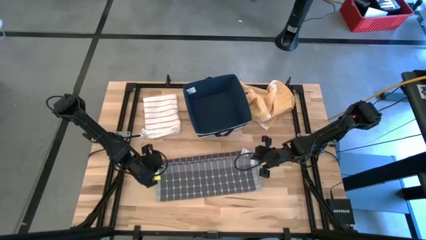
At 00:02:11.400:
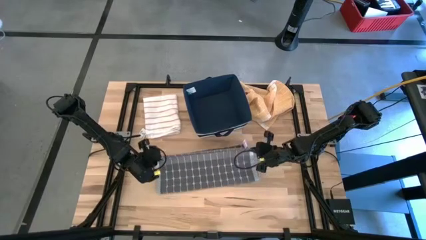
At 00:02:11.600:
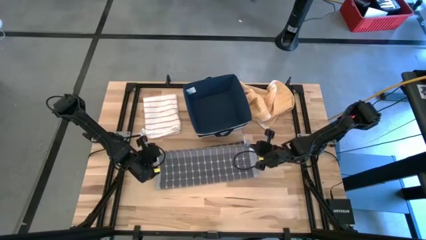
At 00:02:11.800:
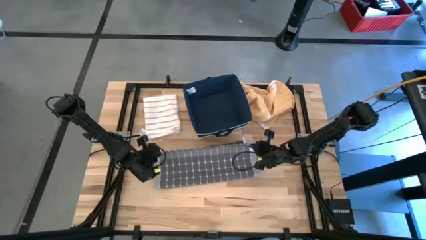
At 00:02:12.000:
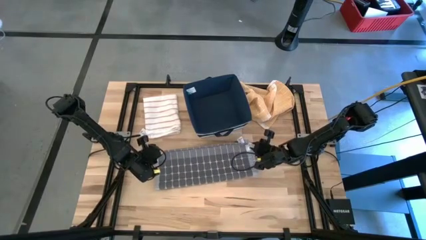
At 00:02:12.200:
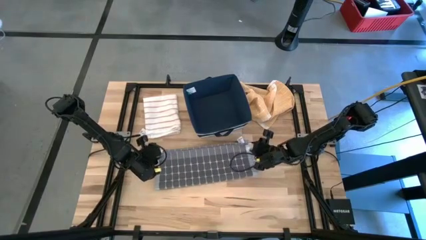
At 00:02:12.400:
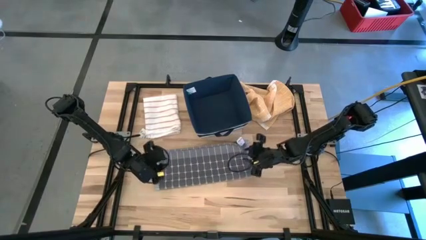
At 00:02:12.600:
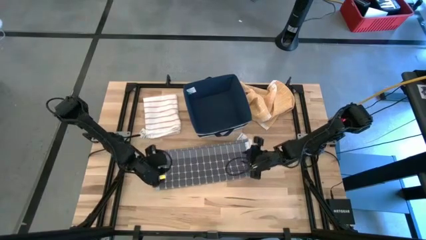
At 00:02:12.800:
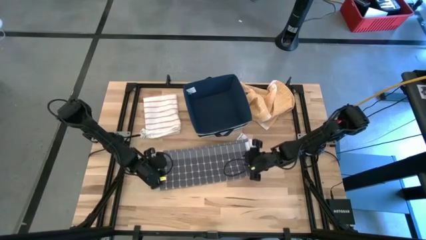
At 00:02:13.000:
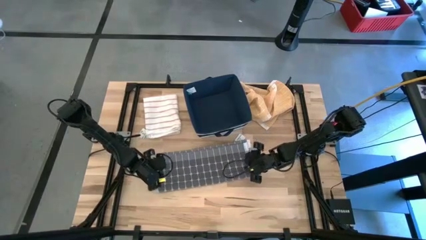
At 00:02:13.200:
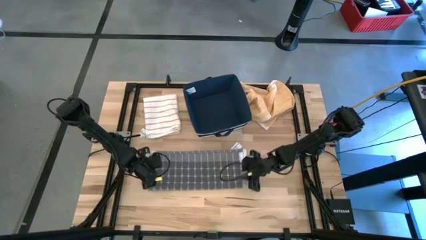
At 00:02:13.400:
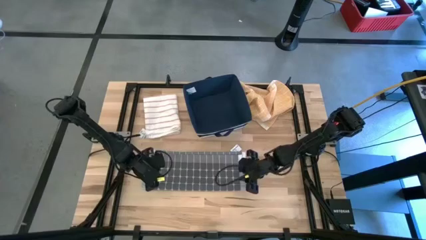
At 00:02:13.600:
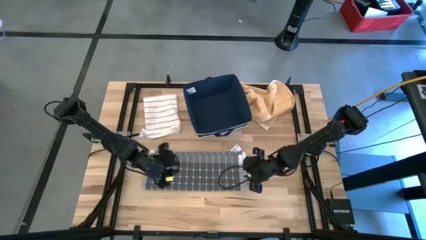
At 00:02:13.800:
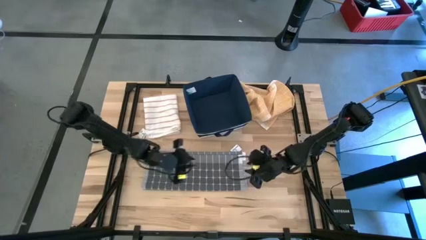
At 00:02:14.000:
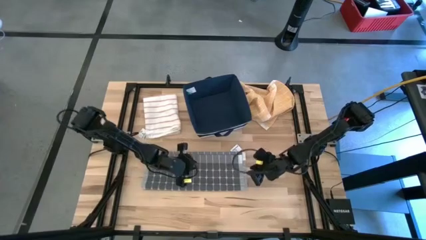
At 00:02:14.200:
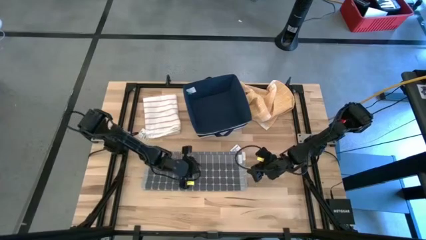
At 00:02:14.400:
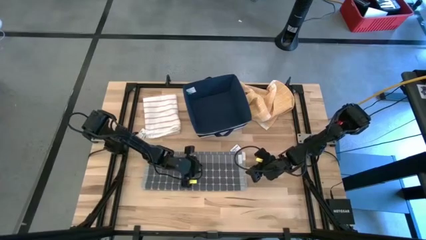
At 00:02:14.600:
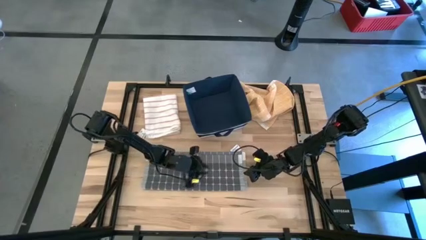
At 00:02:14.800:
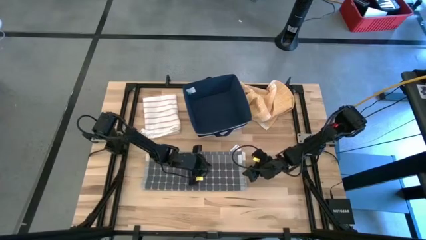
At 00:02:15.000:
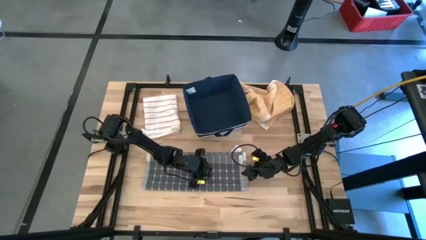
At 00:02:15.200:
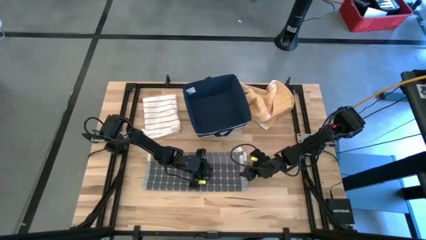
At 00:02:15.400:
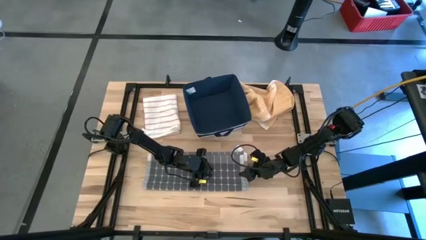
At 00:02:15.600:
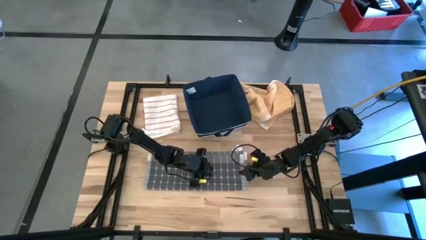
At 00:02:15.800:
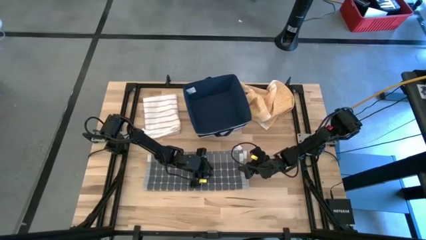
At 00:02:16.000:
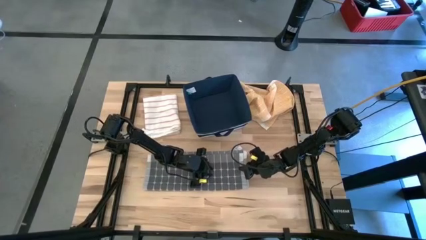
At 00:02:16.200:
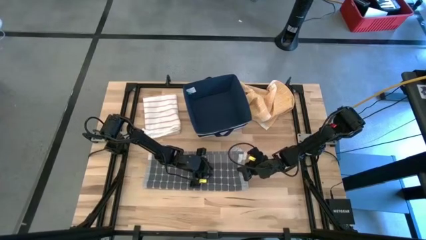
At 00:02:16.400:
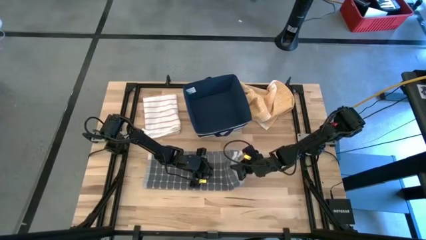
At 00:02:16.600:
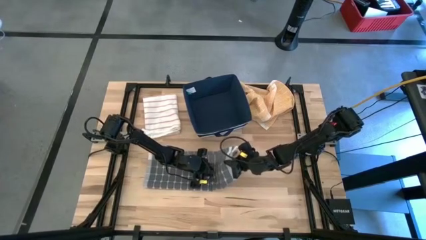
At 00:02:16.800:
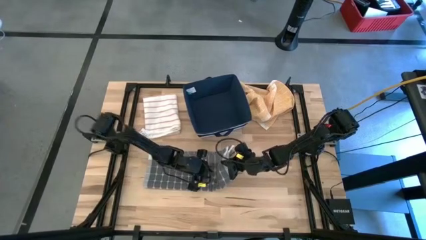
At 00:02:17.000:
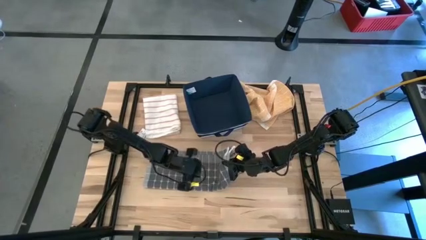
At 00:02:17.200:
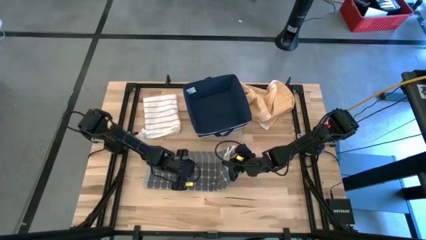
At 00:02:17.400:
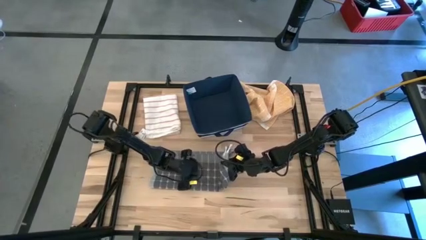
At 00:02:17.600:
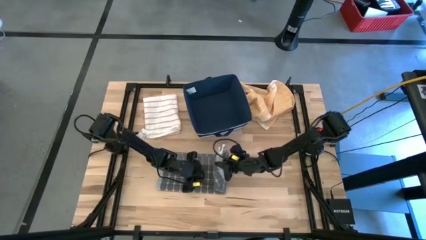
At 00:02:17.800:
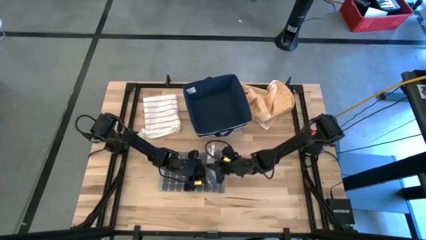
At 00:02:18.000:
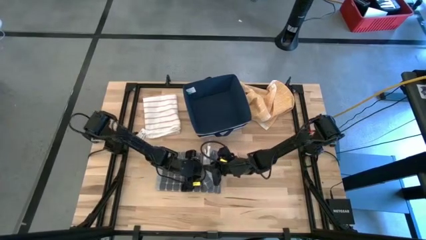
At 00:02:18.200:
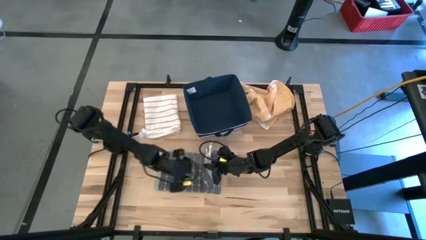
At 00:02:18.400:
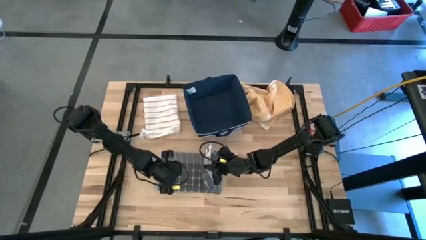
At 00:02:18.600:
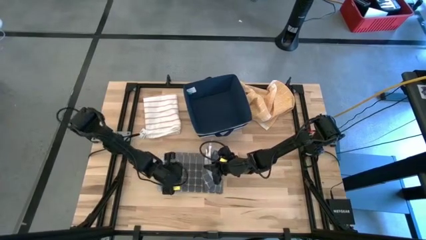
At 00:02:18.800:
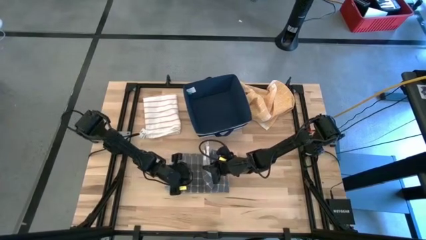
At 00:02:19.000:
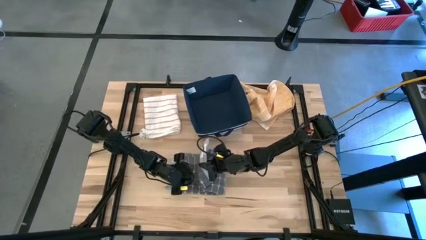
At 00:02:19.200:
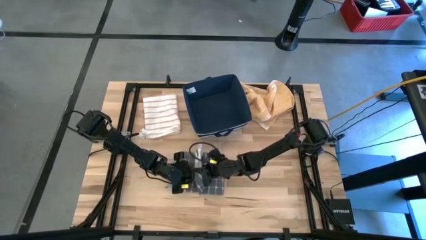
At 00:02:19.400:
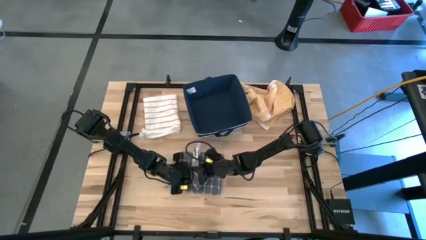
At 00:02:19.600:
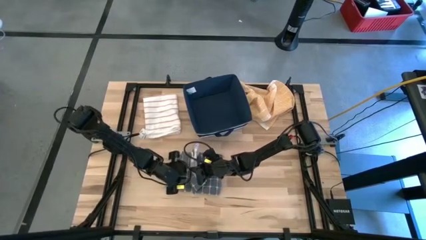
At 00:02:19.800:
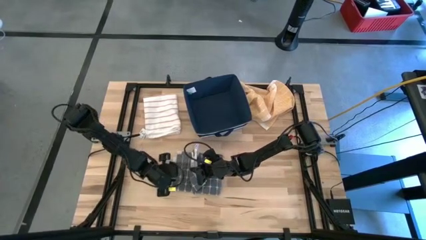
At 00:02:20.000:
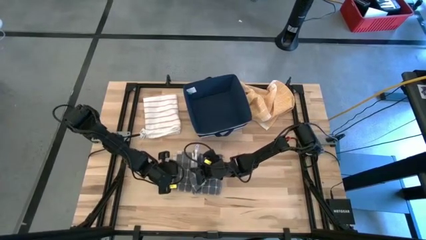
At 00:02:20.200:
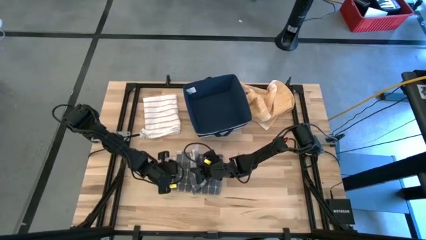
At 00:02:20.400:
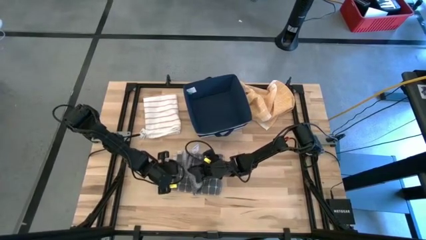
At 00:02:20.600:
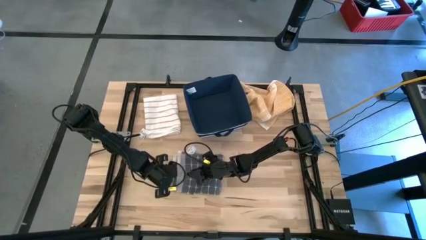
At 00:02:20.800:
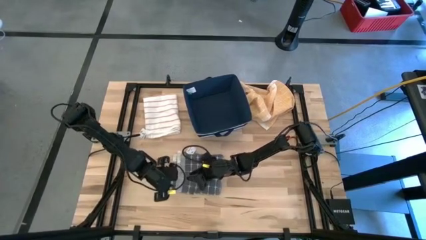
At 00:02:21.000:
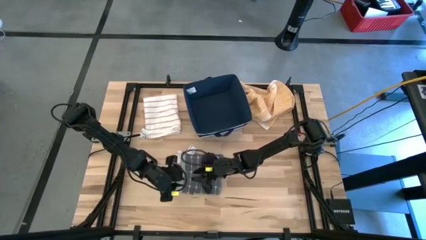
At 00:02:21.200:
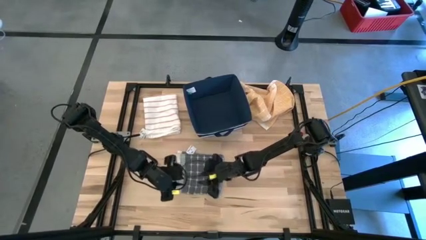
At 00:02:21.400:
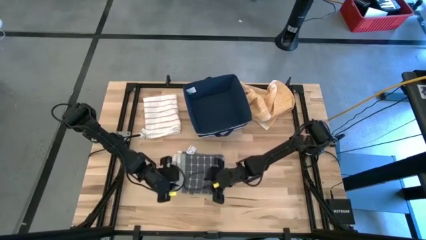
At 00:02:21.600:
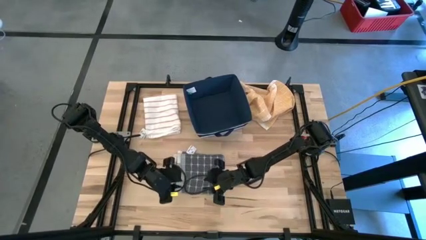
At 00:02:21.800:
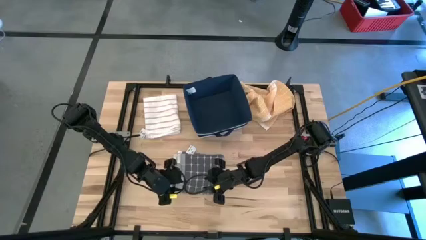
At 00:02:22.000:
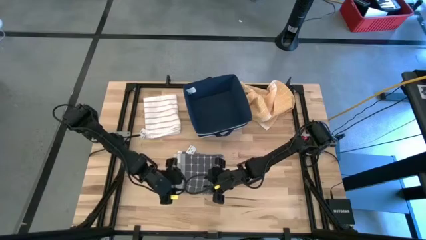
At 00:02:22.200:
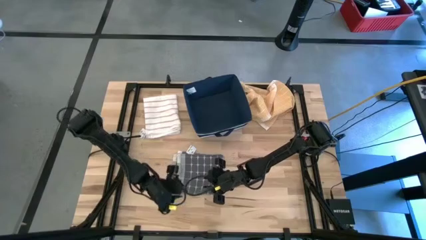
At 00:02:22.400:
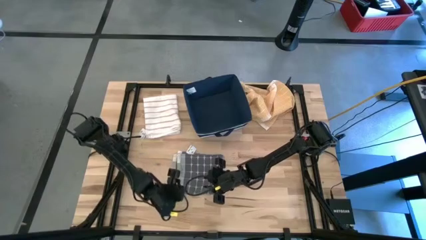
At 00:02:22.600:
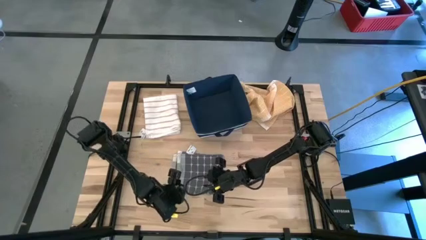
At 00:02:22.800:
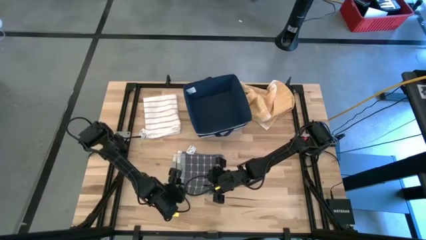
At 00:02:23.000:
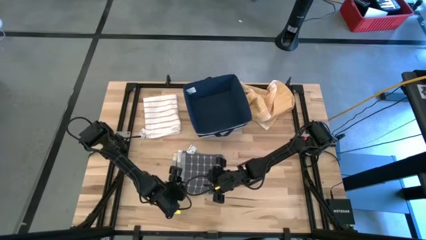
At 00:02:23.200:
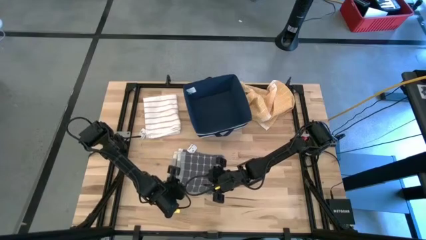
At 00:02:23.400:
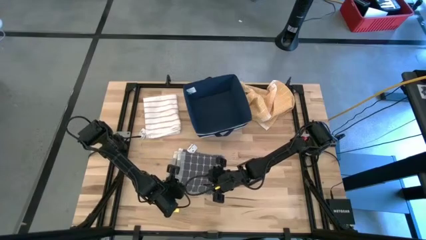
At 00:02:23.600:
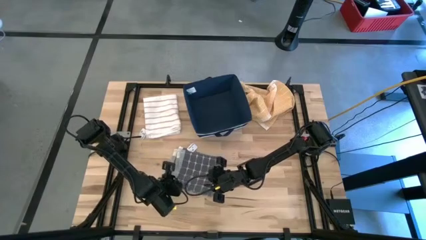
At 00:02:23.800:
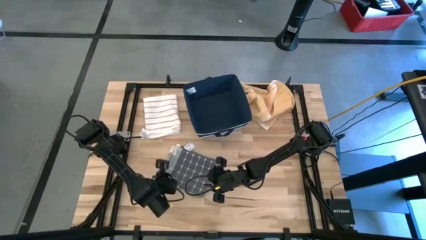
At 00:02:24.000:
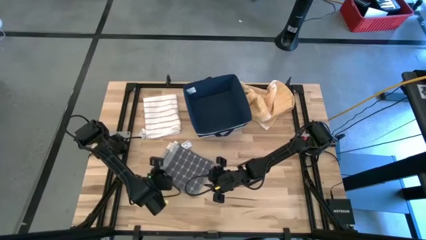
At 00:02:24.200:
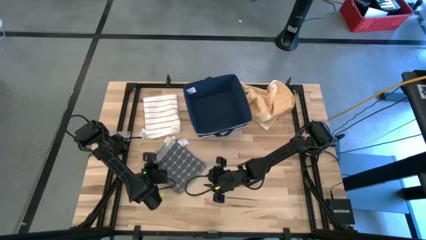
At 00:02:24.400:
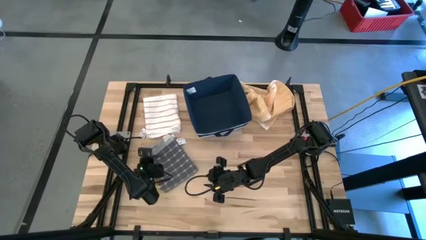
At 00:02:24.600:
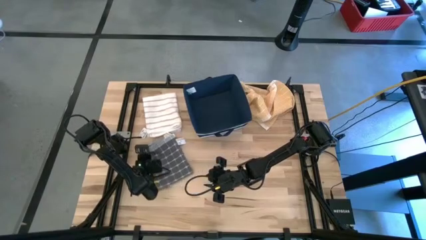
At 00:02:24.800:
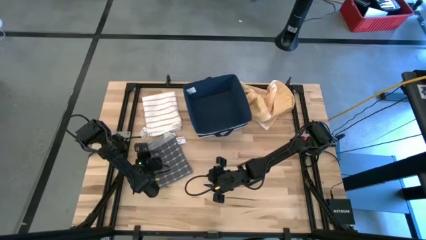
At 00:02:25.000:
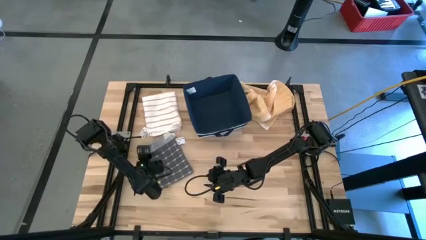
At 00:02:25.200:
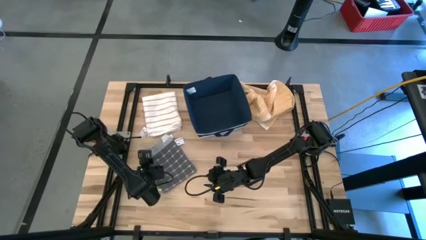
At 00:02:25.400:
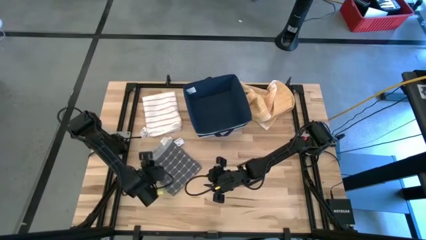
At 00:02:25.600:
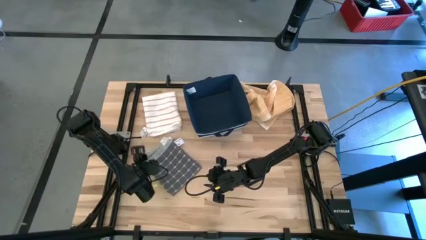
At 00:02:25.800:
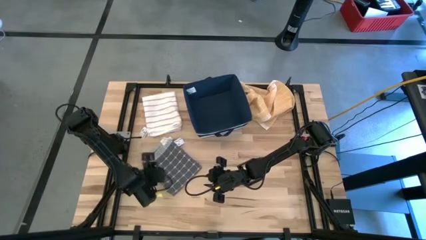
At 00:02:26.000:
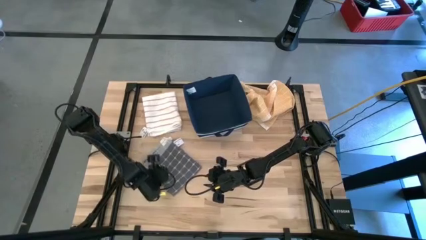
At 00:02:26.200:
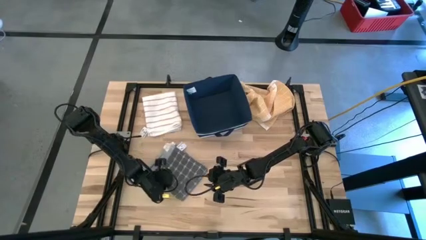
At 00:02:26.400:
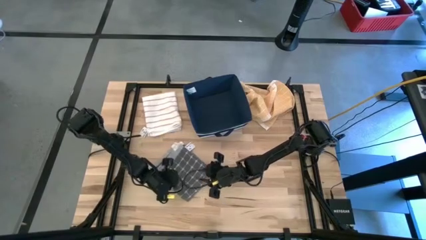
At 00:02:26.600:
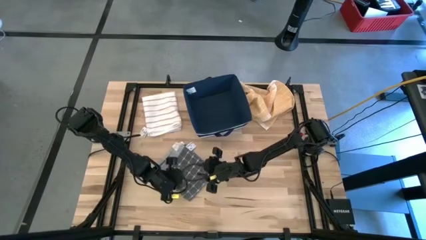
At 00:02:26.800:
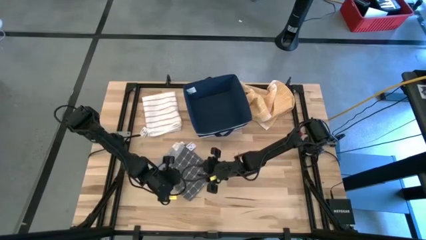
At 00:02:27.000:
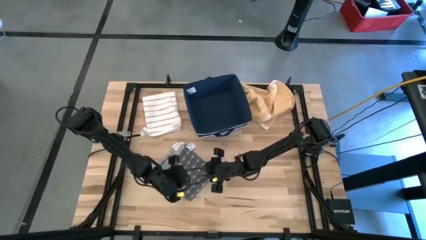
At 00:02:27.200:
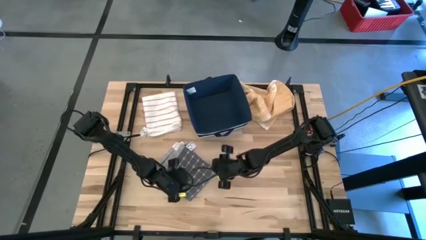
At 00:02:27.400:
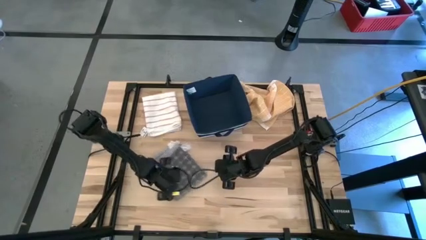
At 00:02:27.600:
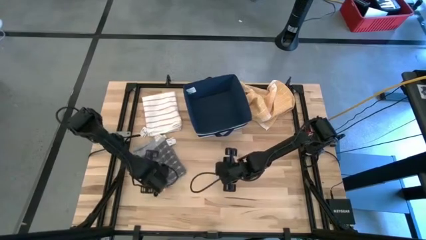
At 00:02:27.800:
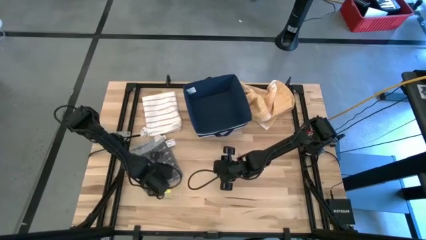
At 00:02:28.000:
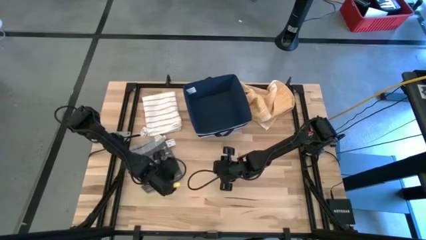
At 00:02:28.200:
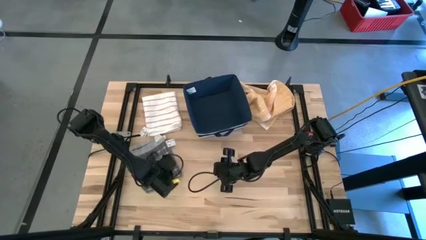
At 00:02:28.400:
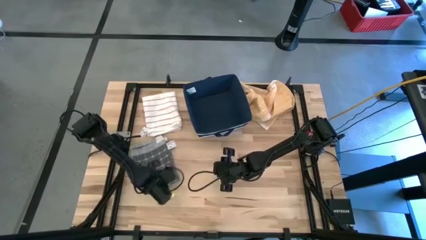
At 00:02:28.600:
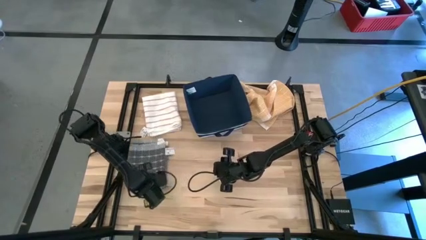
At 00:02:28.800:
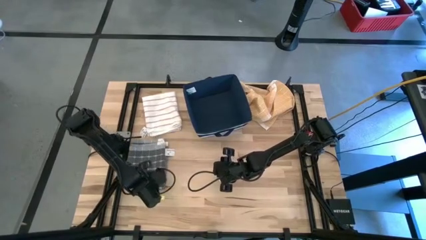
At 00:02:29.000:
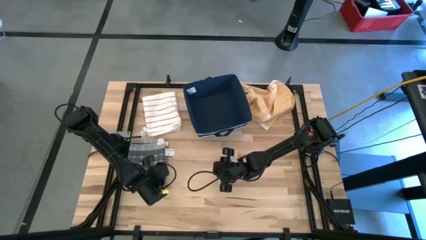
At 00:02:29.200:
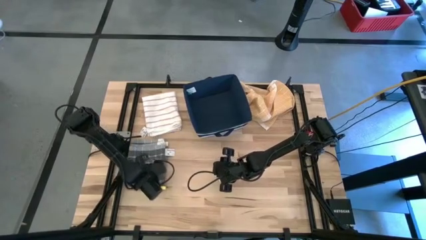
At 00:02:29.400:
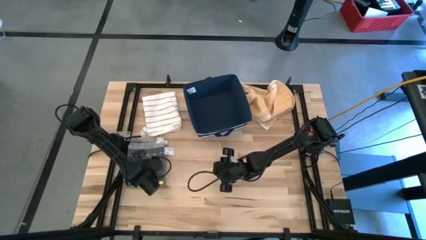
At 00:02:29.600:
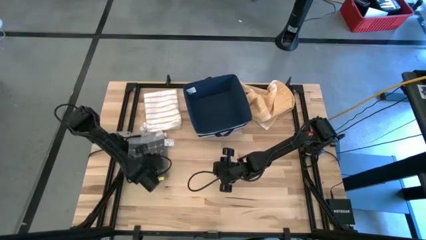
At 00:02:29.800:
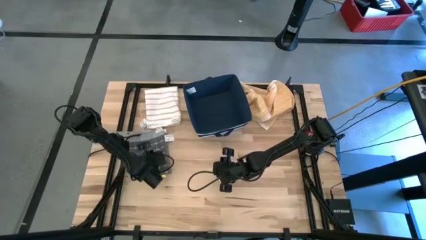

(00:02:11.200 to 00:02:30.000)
Task: Fold towel
Fold the black towel
